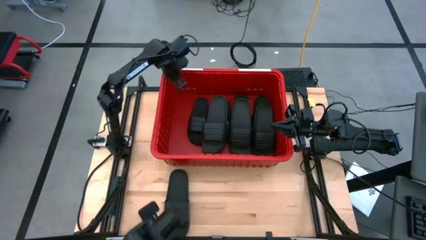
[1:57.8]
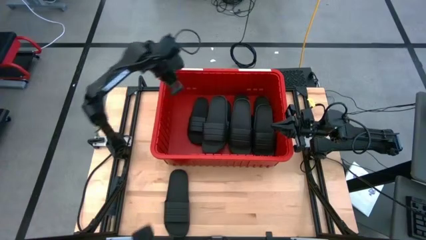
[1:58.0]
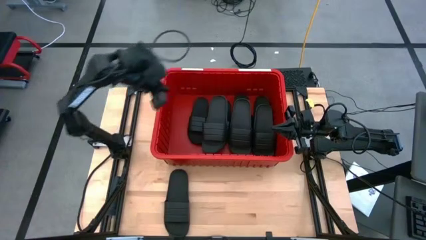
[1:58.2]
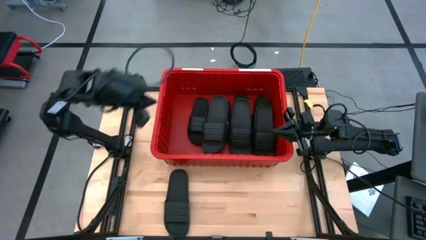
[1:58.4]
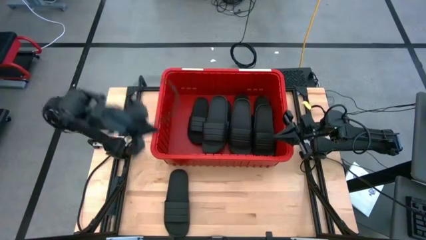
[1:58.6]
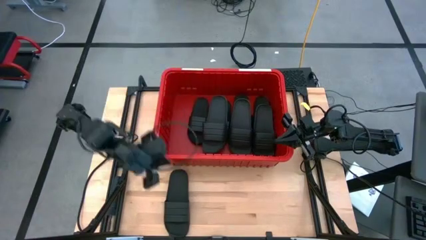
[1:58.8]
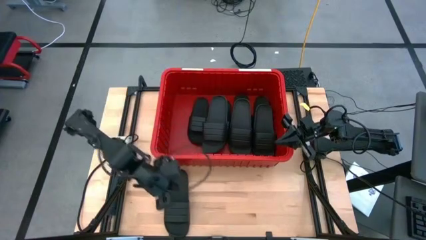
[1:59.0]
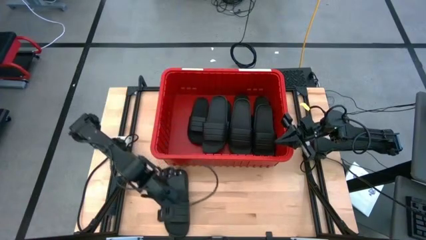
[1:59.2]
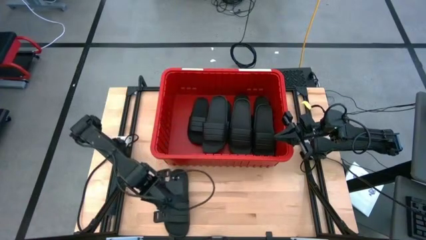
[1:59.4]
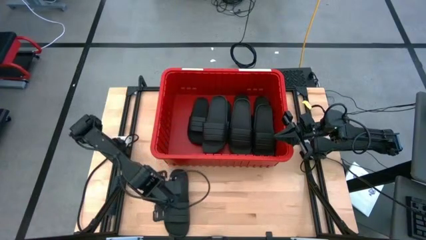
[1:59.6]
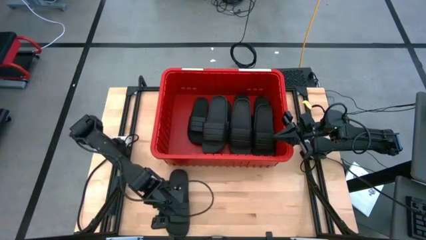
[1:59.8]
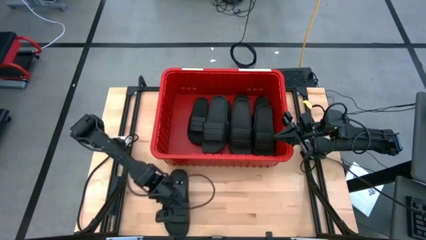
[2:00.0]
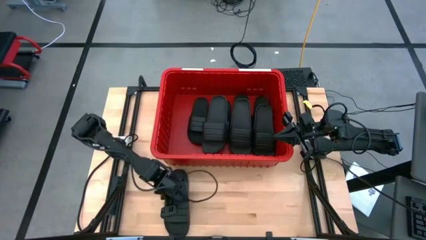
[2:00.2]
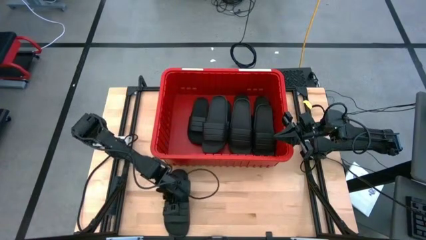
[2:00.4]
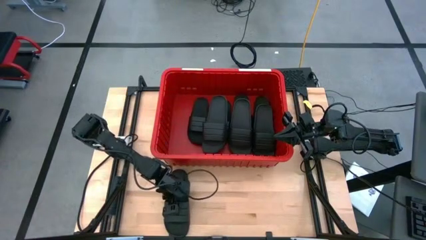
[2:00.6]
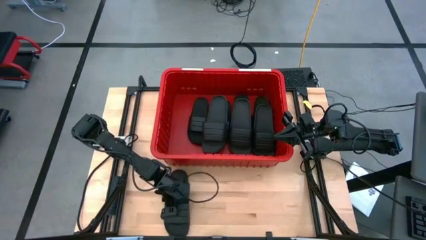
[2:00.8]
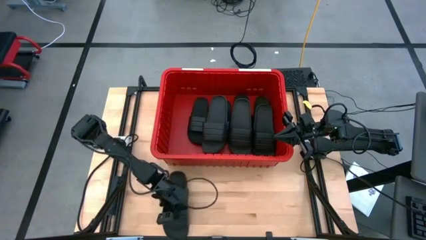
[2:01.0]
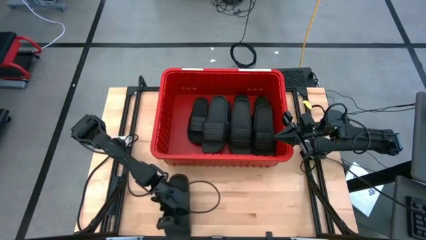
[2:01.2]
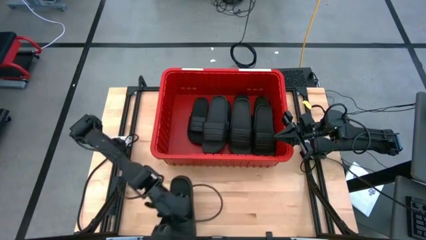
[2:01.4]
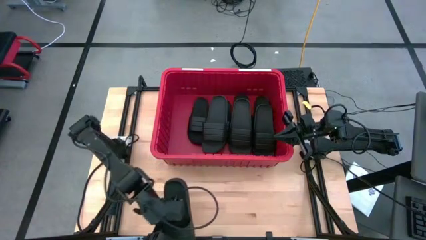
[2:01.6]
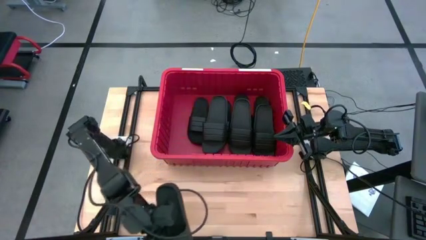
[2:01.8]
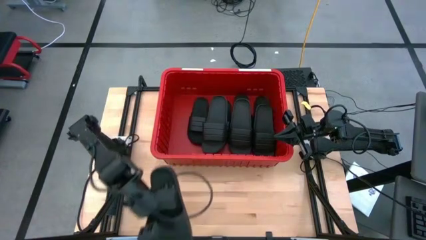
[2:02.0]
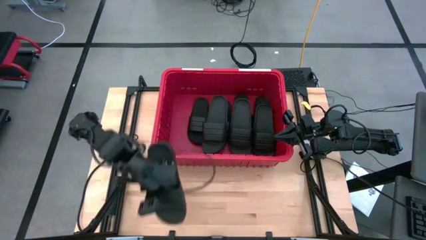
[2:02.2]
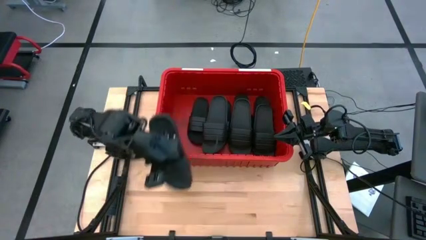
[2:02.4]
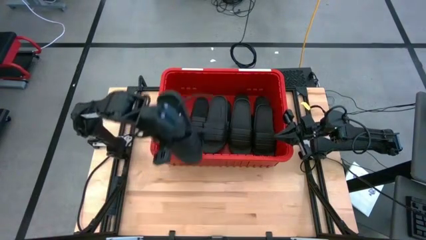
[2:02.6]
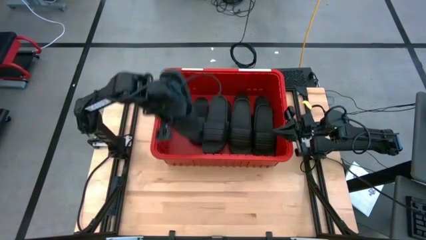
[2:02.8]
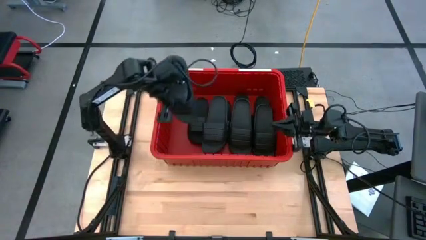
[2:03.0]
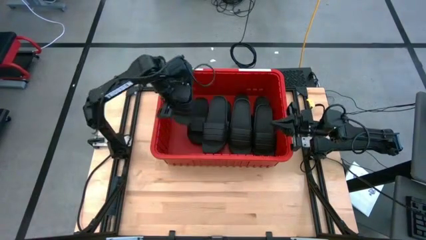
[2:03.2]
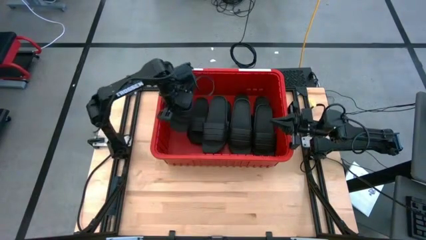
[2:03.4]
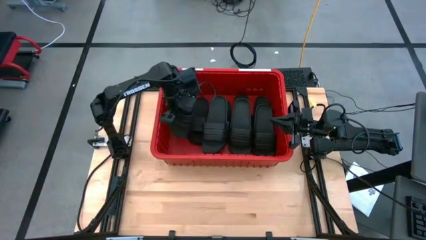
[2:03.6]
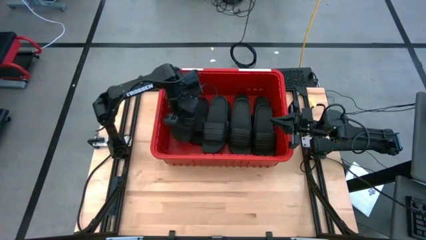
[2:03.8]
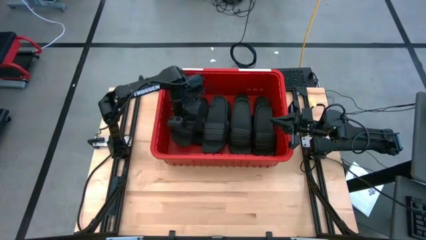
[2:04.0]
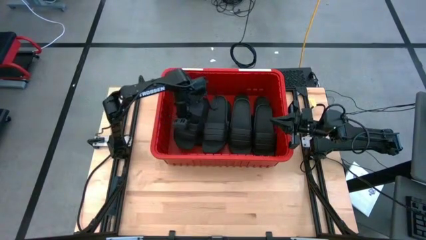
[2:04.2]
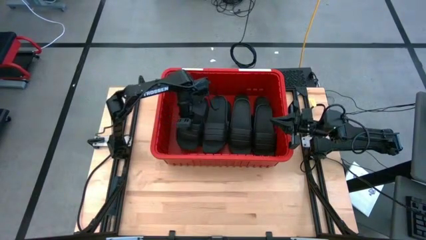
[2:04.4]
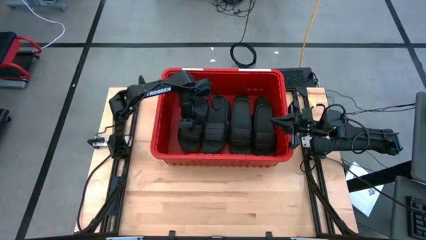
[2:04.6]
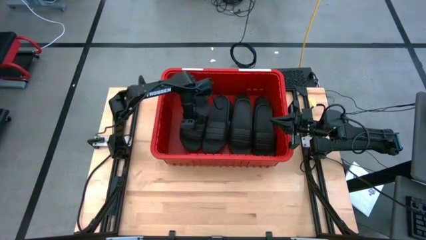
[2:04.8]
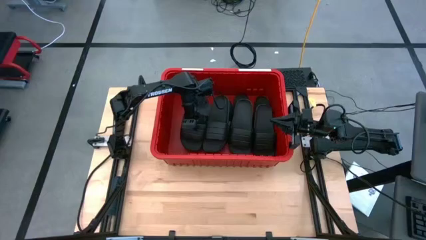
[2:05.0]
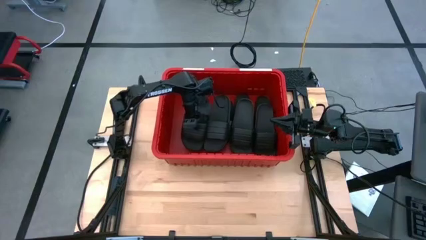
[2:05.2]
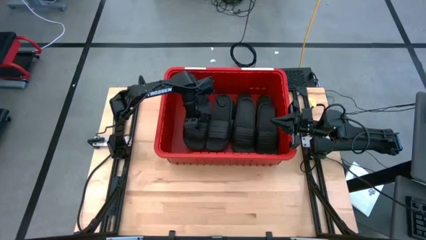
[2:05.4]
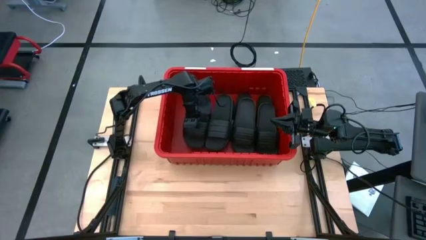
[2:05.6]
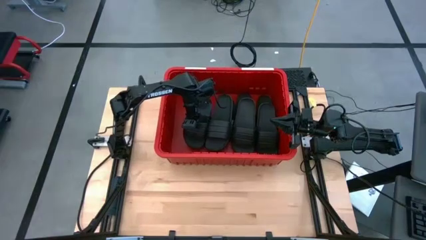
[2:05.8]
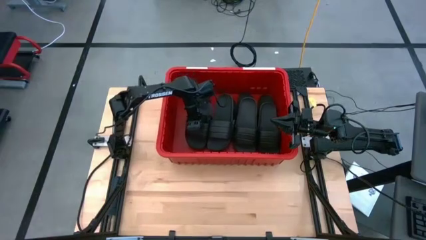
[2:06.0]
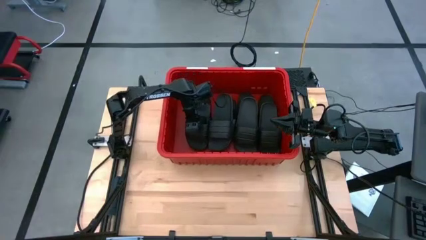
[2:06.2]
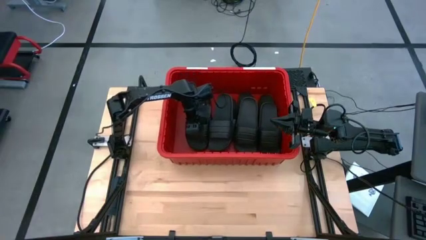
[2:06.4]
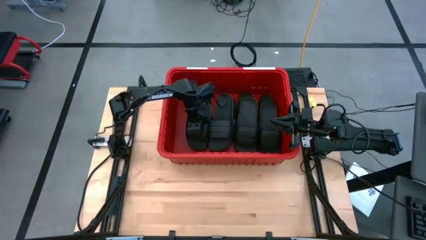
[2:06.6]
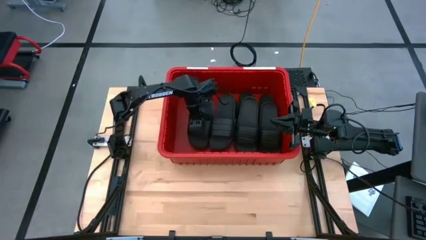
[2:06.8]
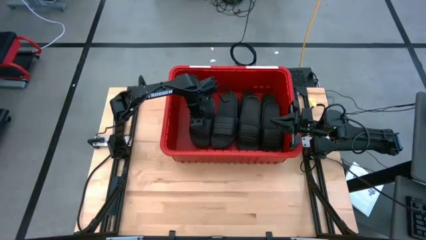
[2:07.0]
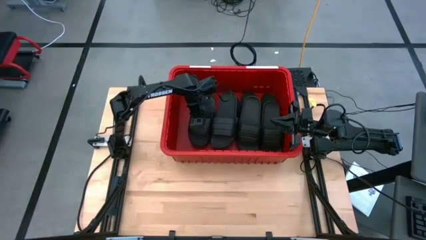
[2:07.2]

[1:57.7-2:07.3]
Task: Pick and place slides into bin
Put the black slides into the red bin

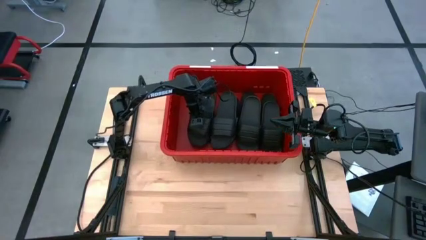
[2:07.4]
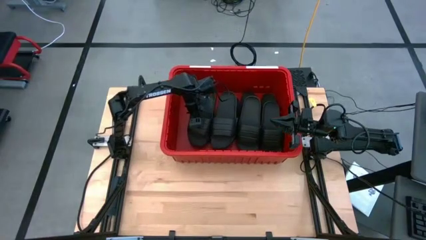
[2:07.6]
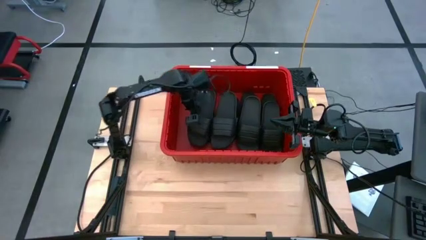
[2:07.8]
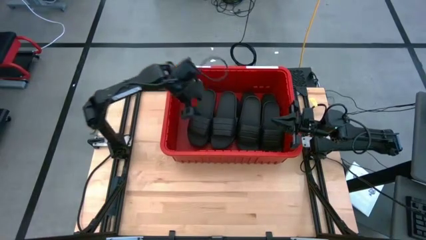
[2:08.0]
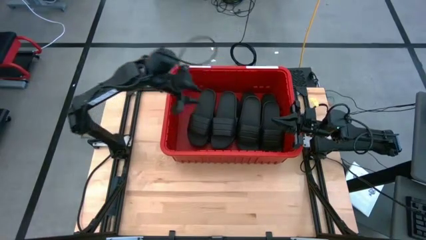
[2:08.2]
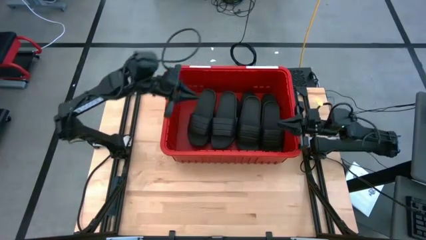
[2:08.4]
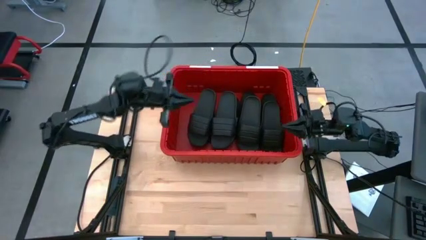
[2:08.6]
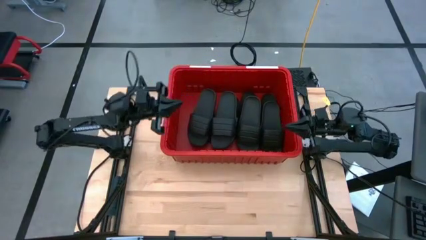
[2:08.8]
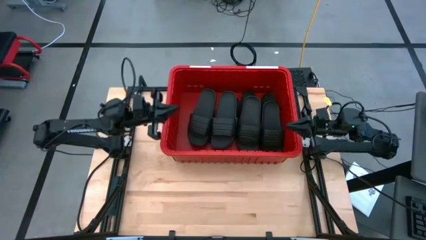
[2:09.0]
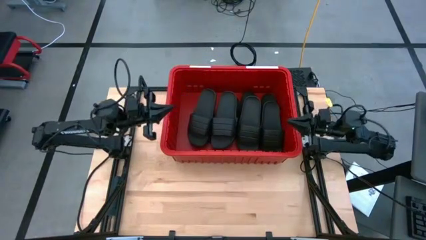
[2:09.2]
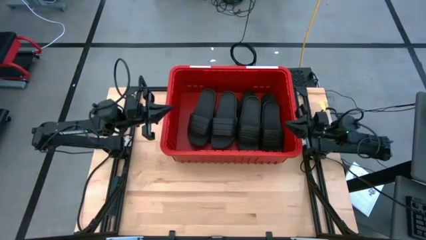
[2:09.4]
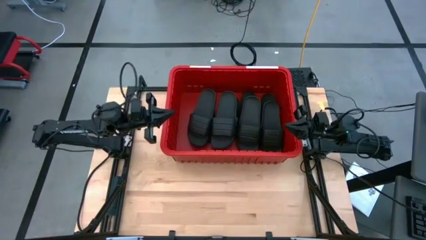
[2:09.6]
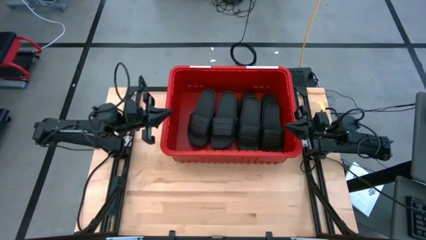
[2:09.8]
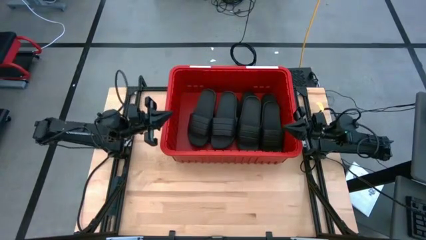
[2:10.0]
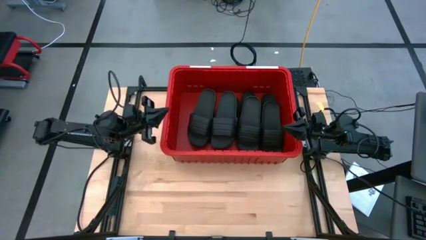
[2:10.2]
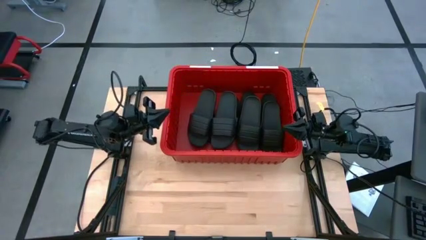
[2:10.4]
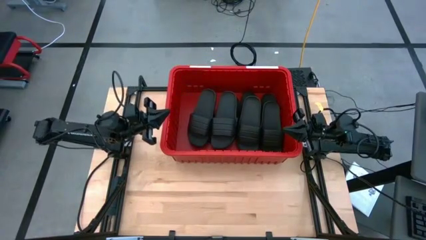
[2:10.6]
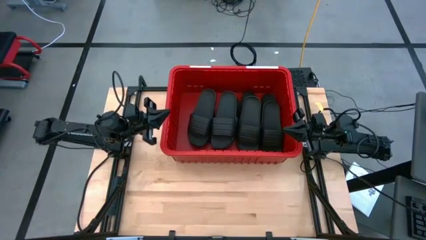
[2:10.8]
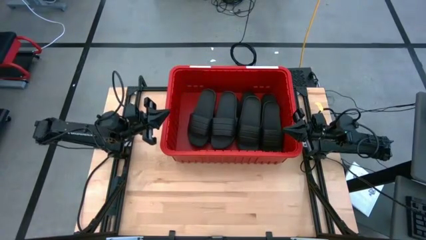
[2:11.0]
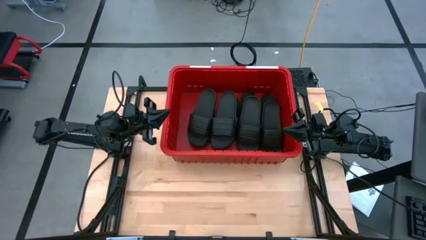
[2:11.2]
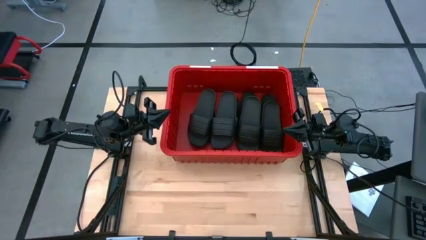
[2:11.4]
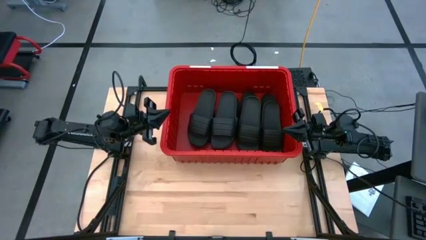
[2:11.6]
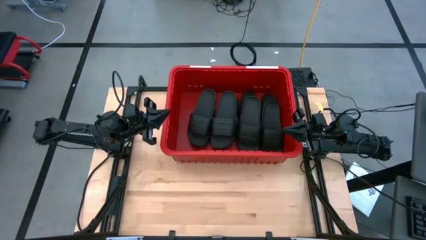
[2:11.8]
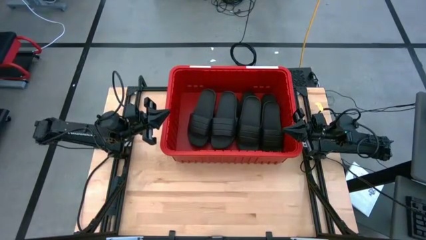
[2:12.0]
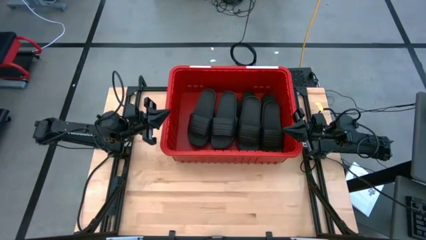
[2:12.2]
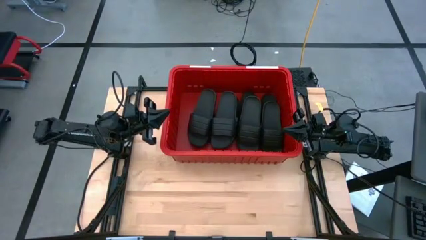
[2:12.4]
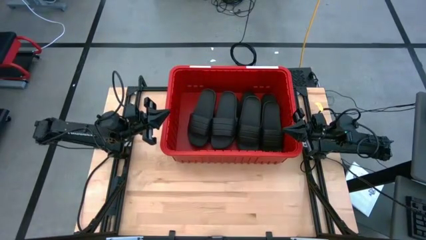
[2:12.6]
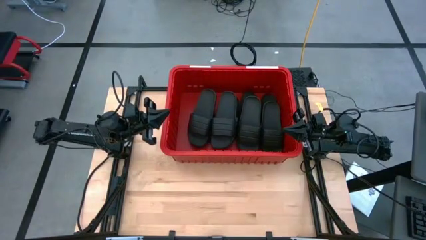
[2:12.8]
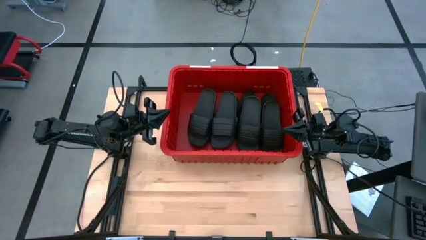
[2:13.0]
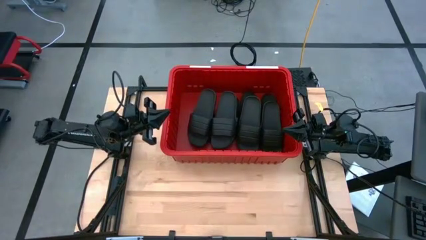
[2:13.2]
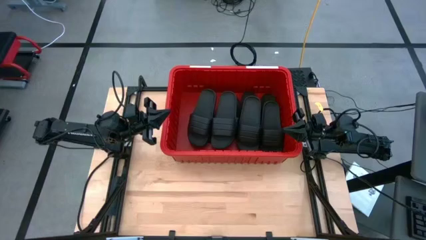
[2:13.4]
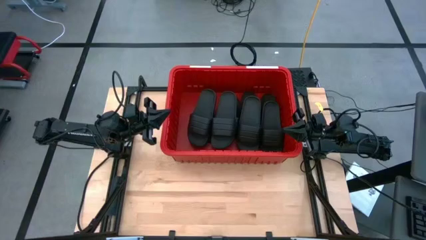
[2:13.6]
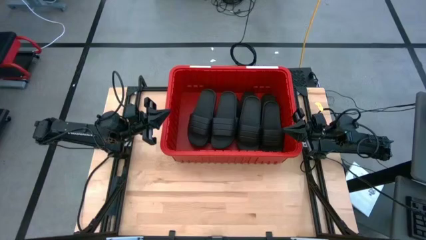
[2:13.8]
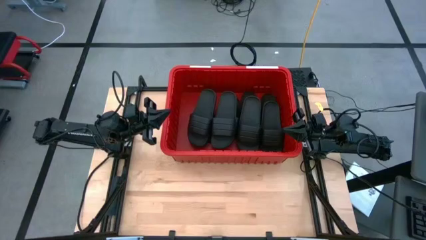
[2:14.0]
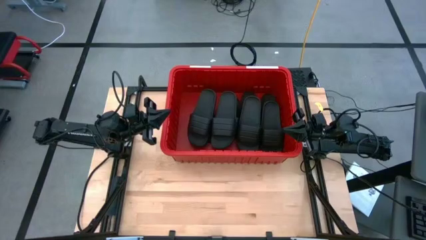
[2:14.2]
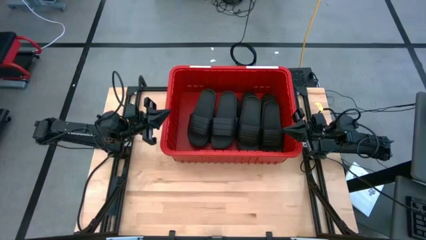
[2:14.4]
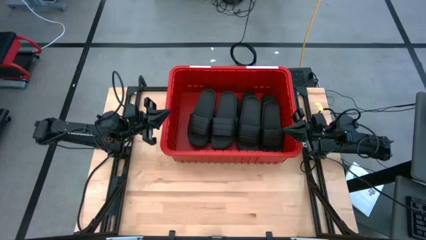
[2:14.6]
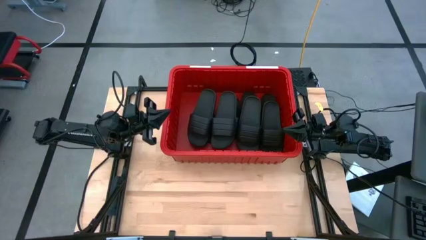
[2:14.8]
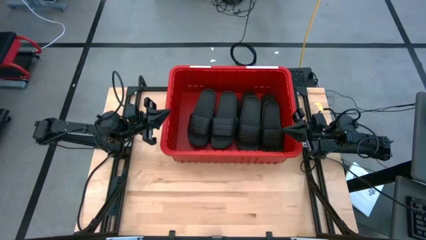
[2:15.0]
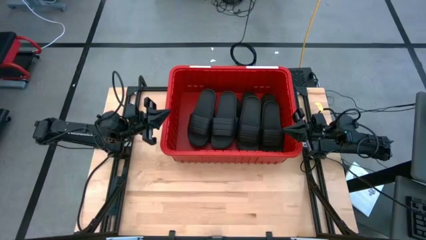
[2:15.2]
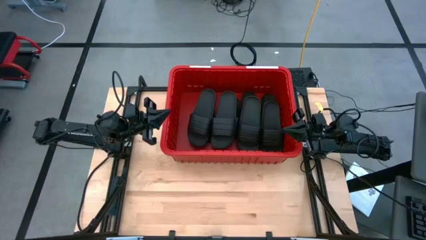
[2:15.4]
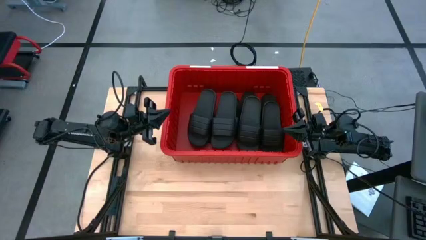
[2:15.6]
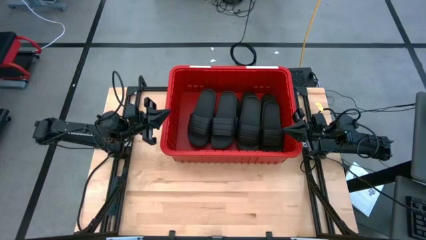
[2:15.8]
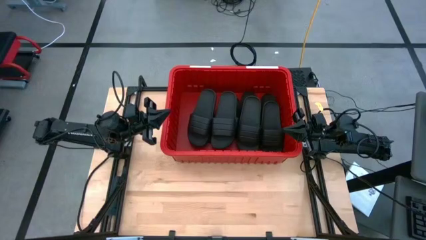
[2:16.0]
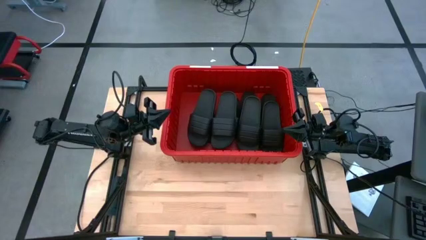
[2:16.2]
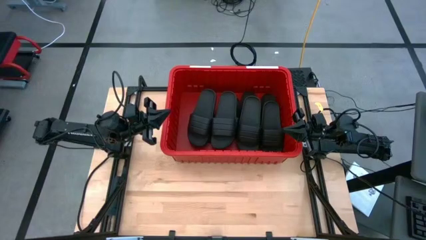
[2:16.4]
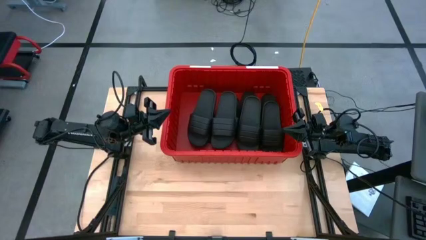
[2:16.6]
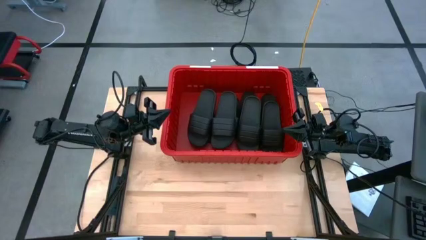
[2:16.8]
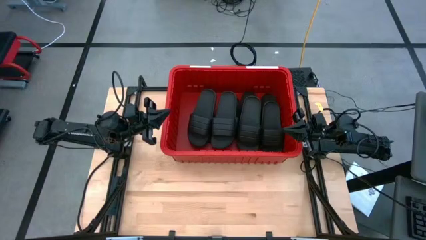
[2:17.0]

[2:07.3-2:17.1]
Return to Home Position
